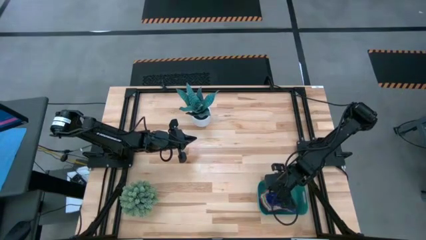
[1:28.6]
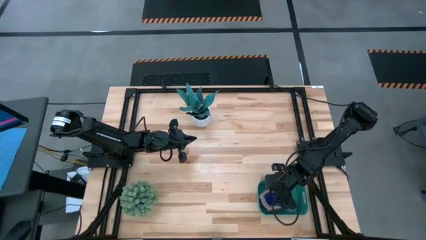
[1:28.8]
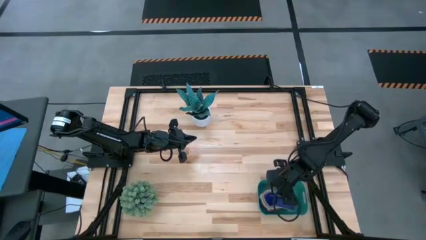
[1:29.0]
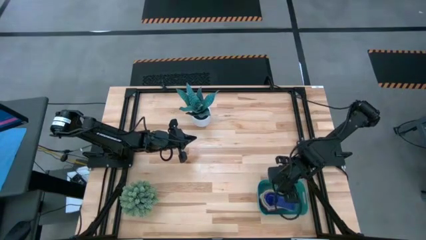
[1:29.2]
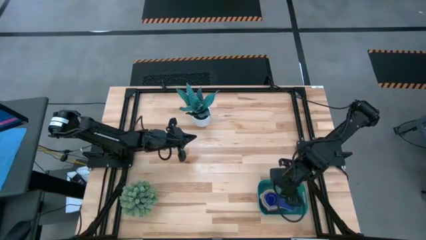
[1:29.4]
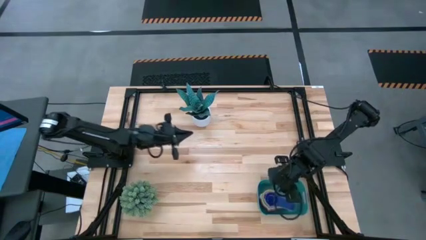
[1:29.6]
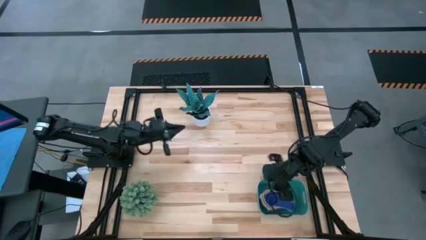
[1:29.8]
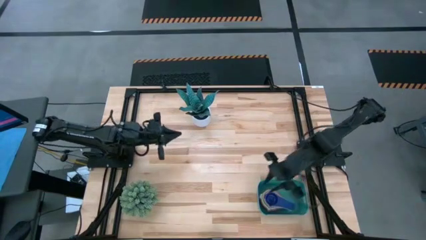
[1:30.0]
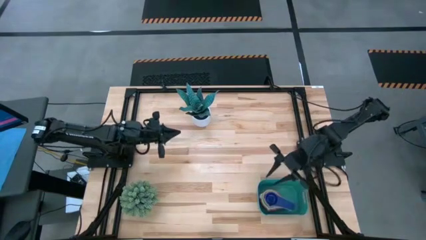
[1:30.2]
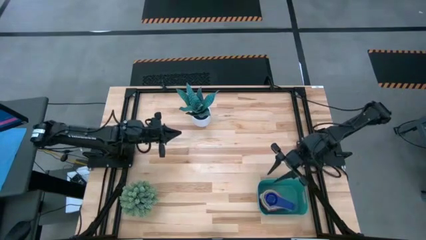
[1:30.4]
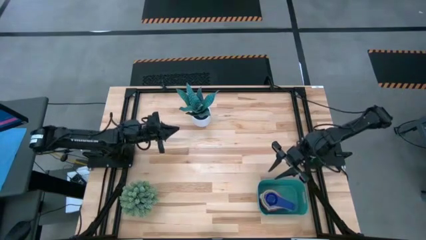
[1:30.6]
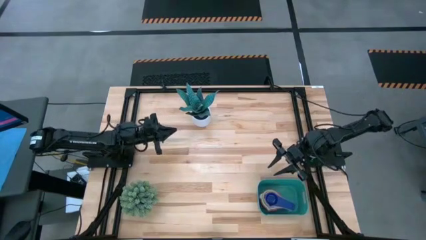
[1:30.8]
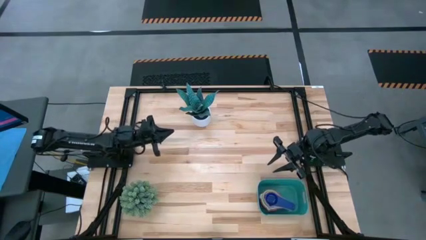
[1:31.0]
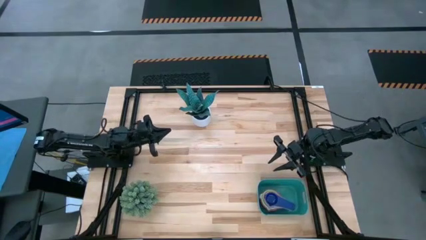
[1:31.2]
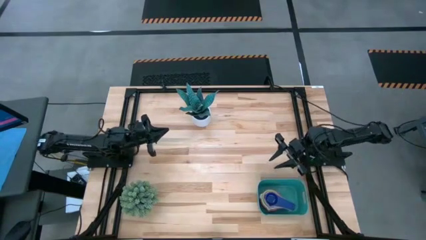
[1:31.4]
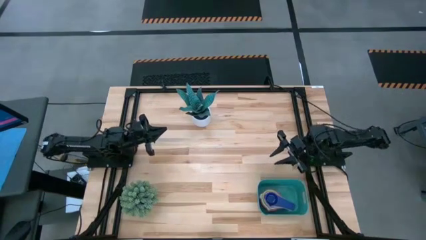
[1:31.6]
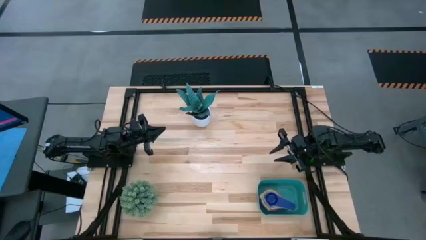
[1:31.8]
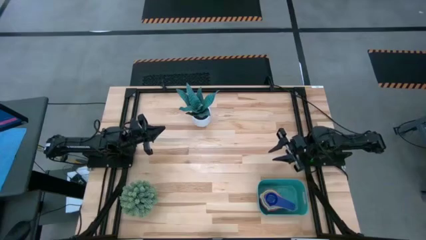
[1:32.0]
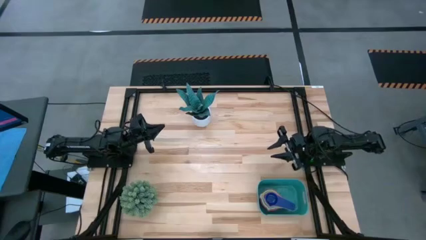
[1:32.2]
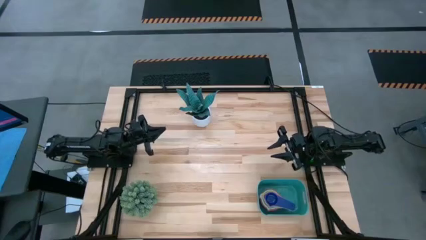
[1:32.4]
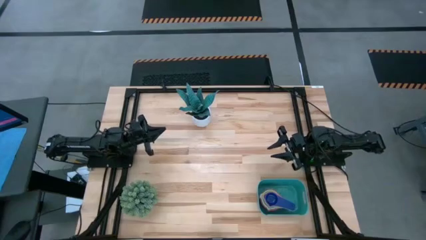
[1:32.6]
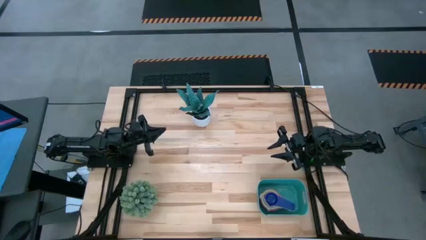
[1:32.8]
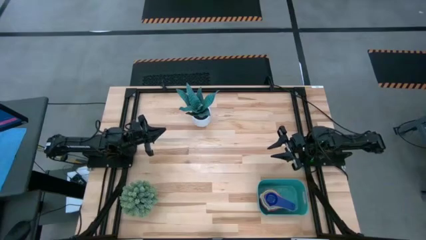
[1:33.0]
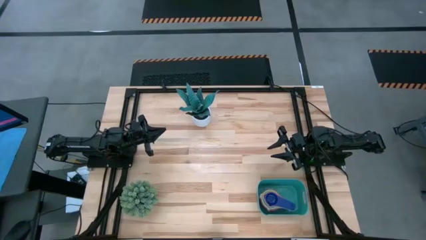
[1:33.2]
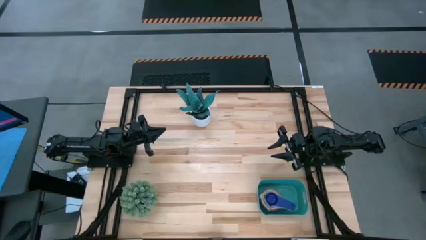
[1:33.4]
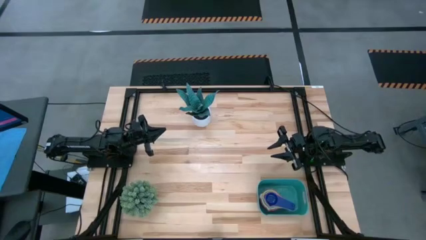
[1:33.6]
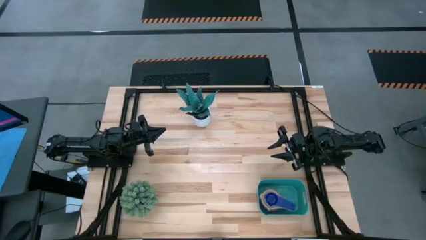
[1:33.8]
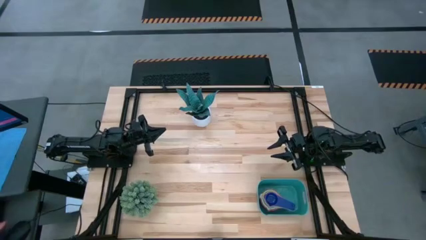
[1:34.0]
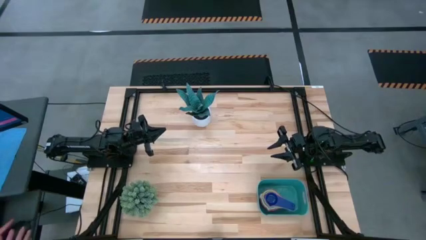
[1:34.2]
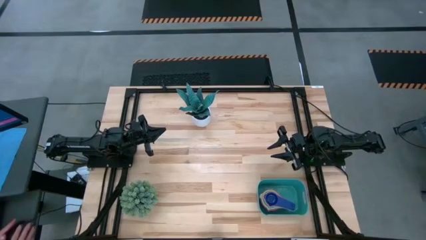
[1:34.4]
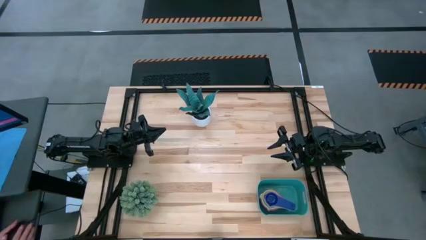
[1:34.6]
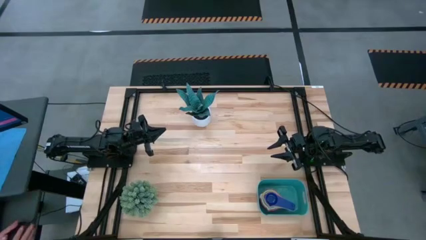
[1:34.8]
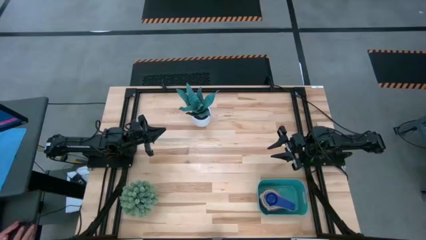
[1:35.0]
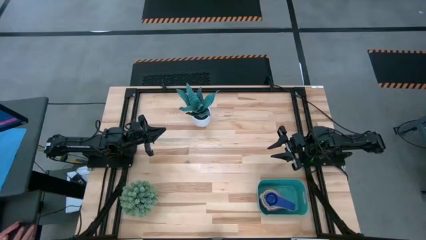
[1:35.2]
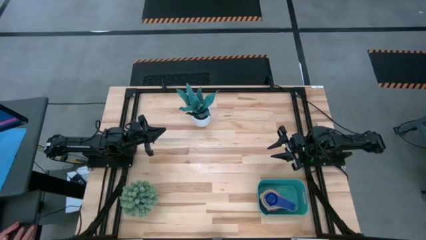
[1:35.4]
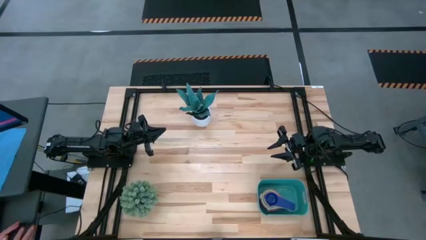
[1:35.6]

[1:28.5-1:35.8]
Task: Nest measuring cups in basket
Return To Home Position

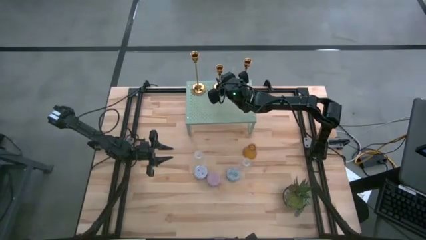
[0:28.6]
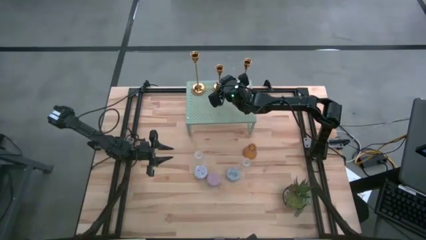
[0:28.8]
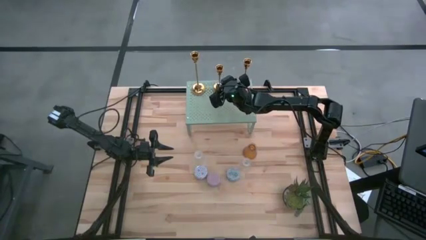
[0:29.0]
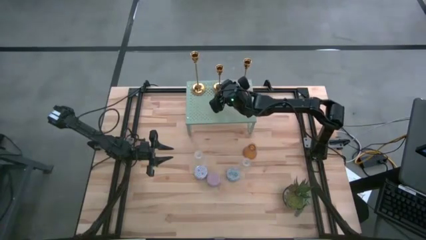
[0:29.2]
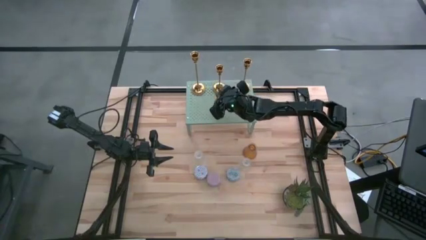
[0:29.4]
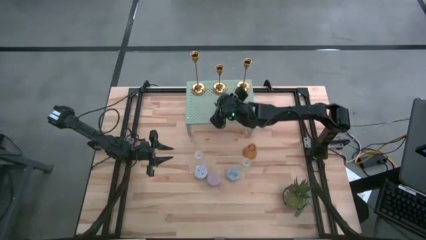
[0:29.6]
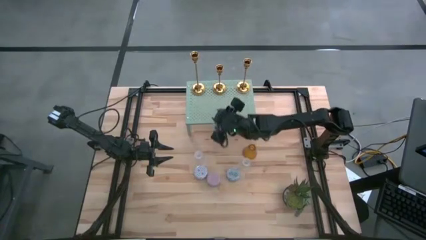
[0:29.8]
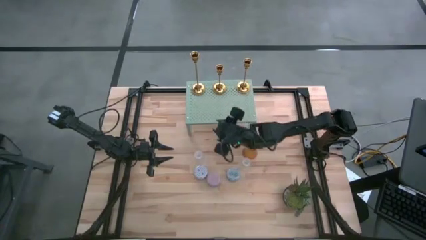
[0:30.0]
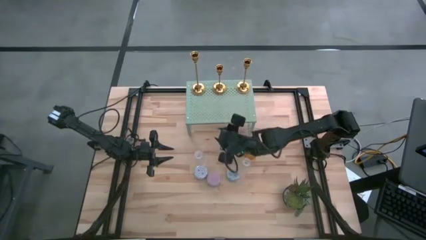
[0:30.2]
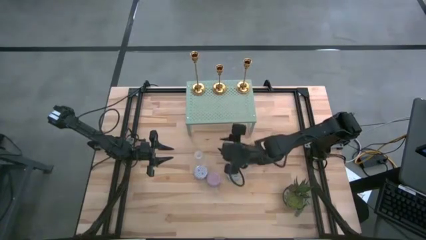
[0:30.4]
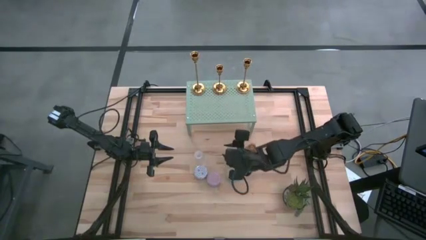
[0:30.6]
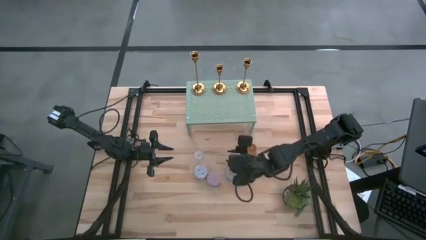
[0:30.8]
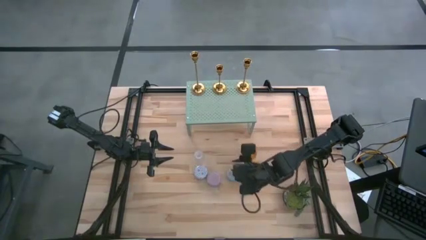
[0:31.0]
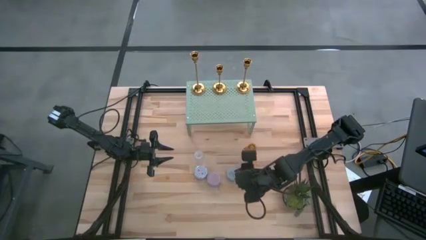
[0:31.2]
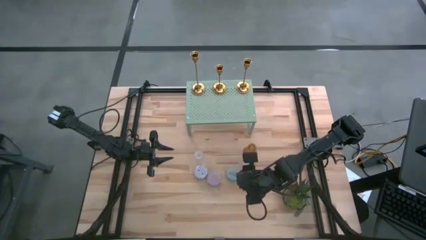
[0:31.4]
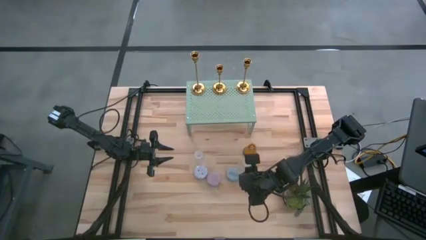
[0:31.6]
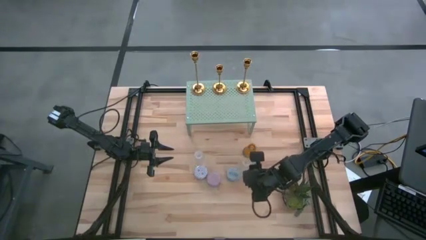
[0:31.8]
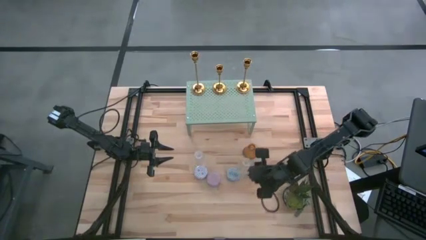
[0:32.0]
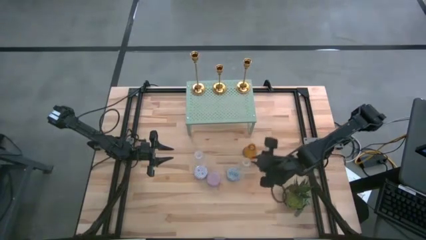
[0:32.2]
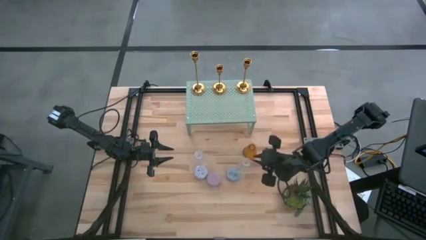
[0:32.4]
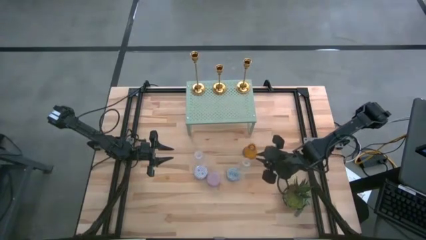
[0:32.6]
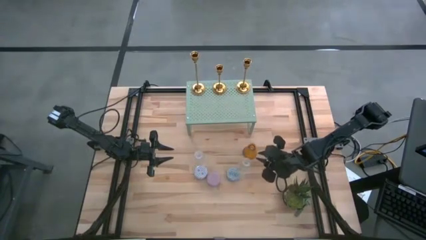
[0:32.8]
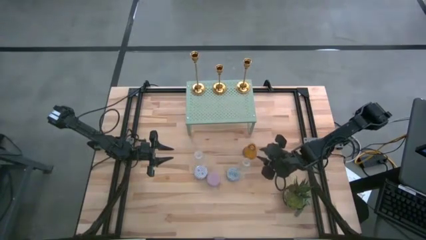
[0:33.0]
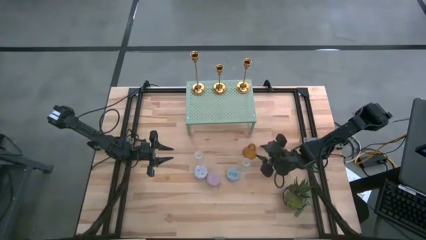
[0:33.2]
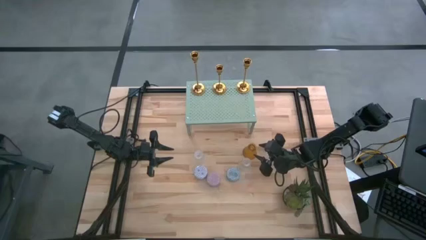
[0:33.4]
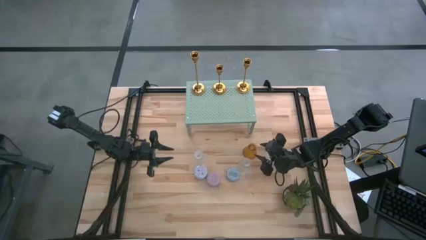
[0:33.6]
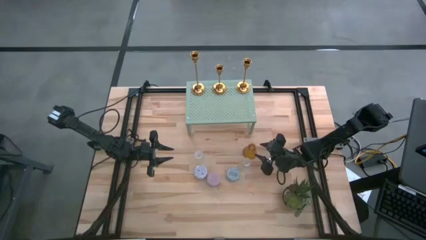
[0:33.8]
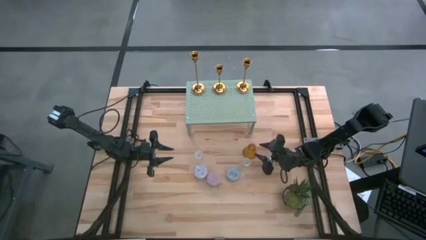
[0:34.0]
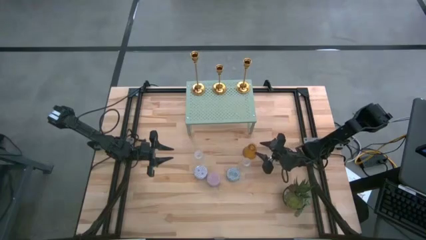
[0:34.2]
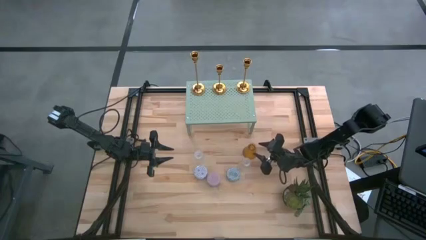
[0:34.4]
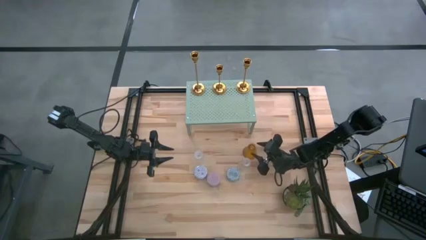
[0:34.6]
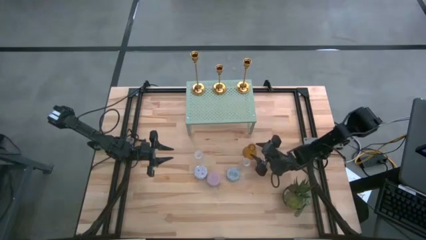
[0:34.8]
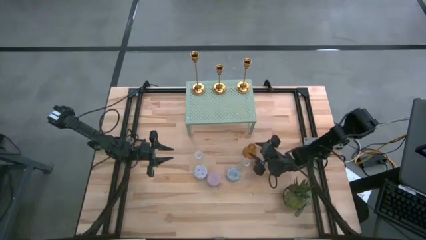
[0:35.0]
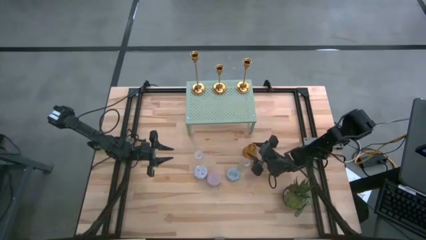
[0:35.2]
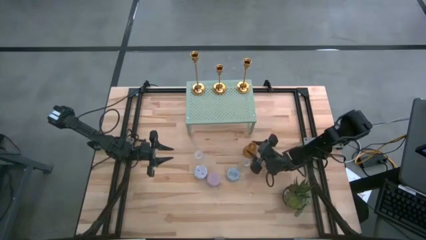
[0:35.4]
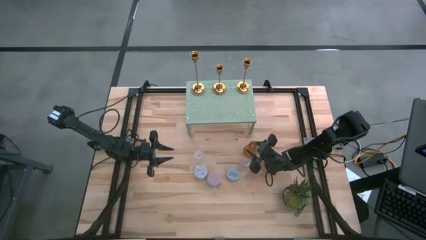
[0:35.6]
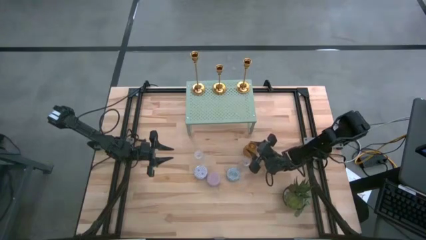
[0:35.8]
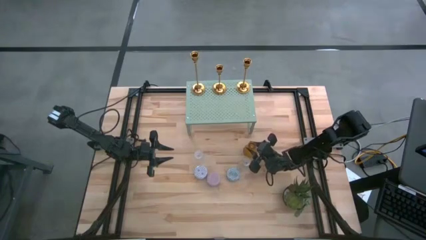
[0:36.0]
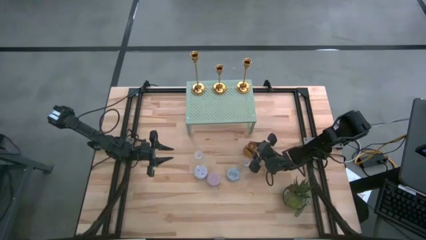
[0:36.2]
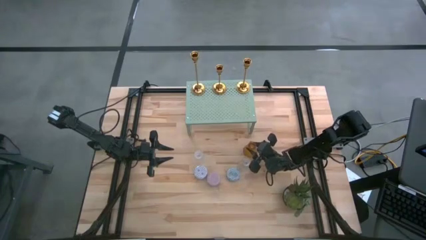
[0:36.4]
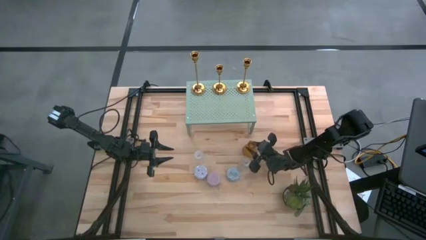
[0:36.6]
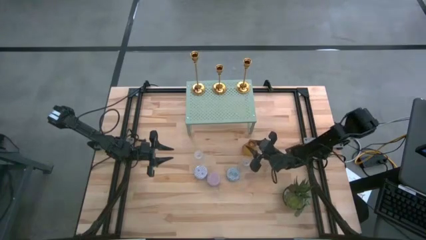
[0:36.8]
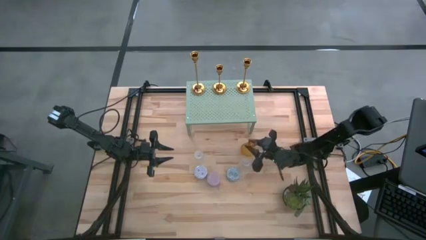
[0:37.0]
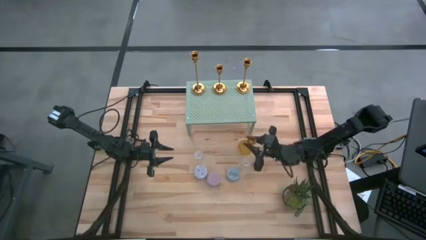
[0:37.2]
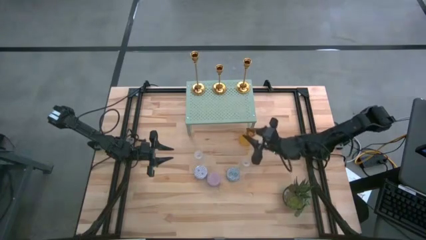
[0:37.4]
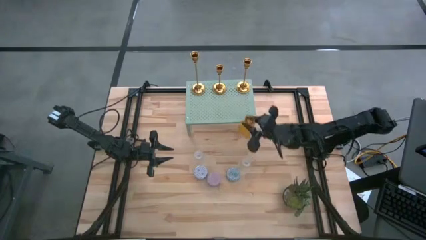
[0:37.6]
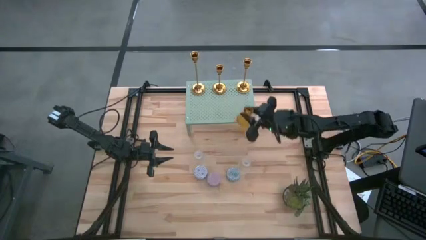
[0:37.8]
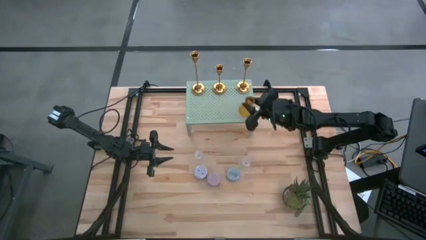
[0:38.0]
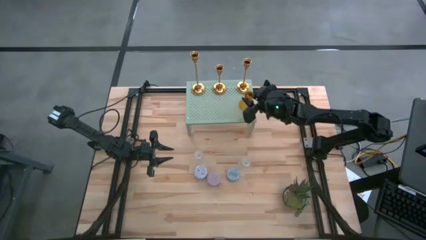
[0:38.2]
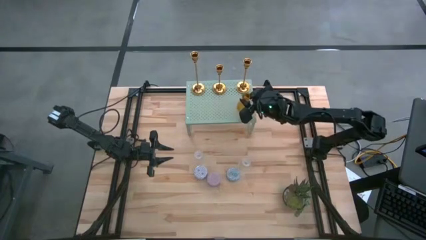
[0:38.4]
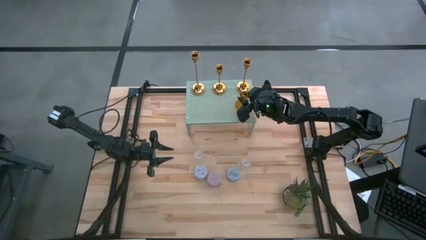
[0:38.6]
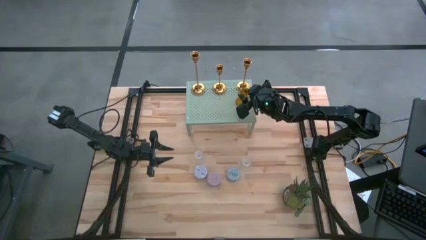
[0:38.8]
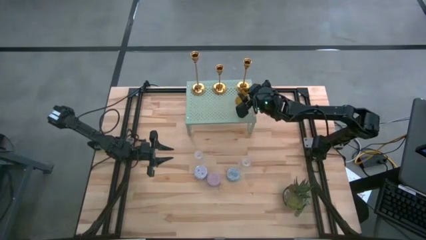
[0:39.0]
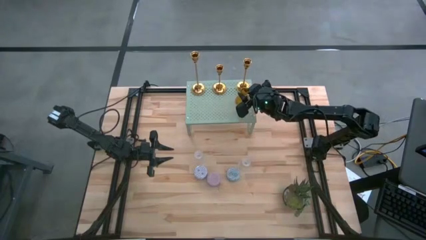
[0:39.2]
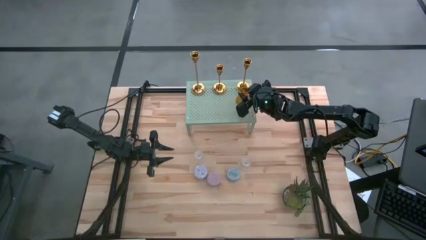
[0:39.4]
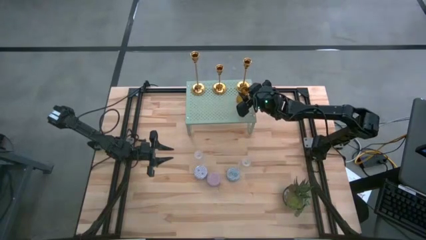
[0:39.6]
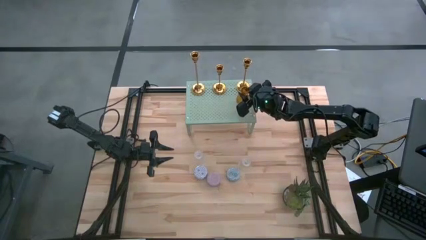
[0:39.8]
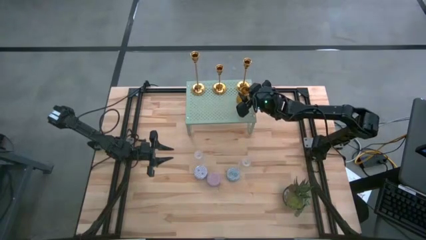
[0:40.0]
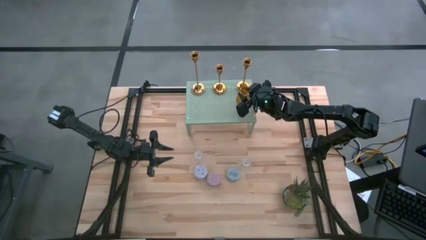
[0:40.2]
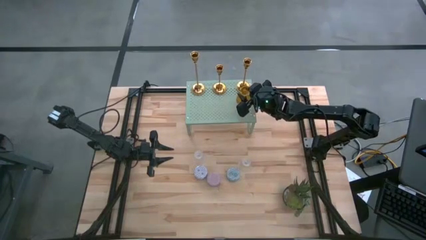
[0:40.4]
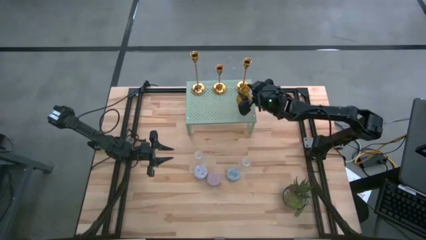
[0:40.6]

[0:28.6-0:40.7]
Task: Pick & Place candle stick holders
Put the gold candle holder on the shelf
